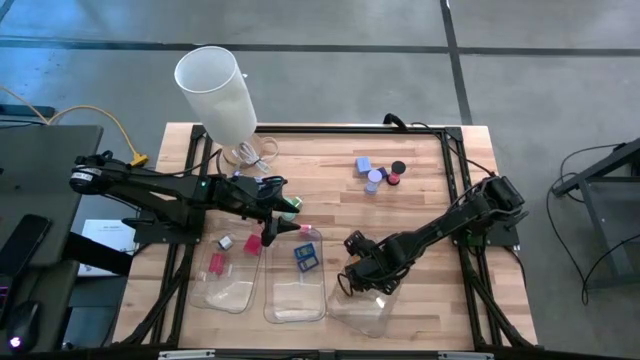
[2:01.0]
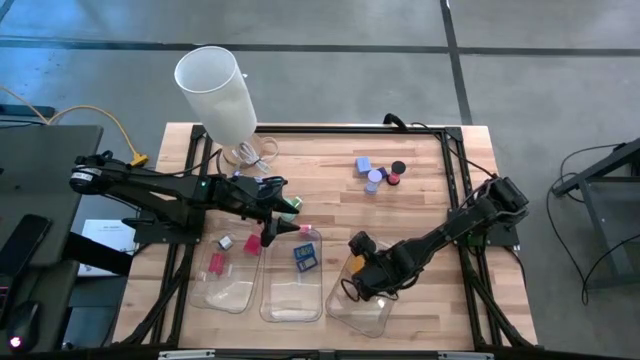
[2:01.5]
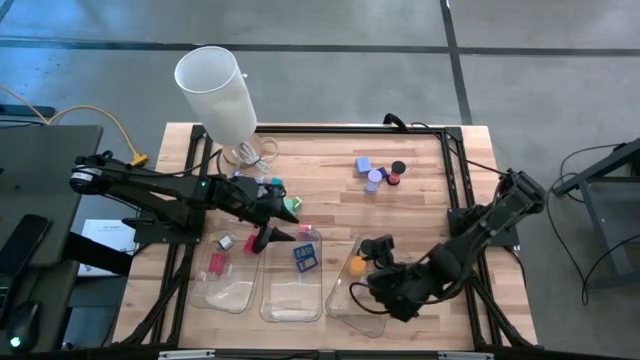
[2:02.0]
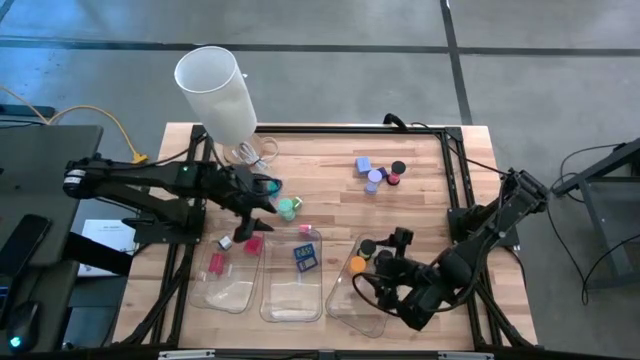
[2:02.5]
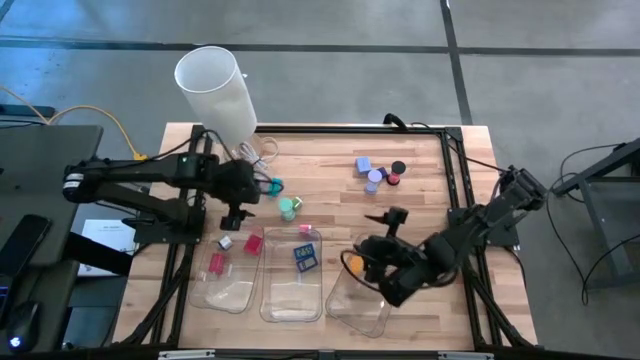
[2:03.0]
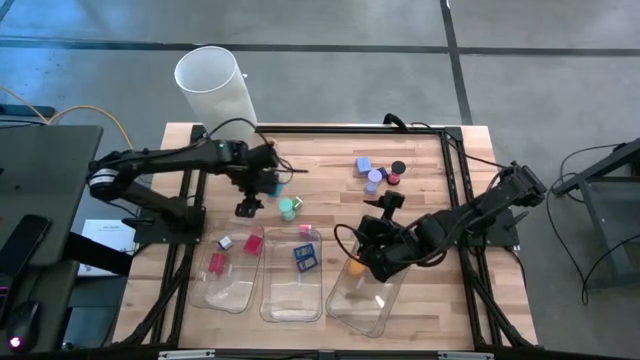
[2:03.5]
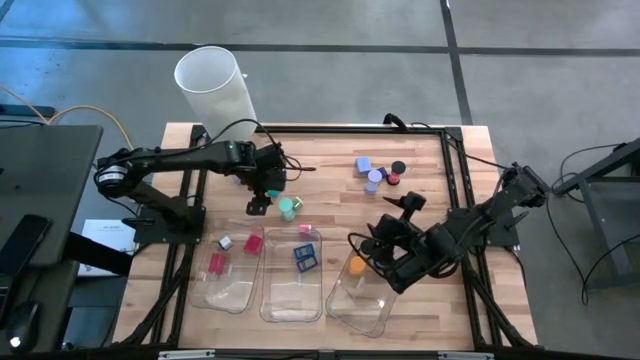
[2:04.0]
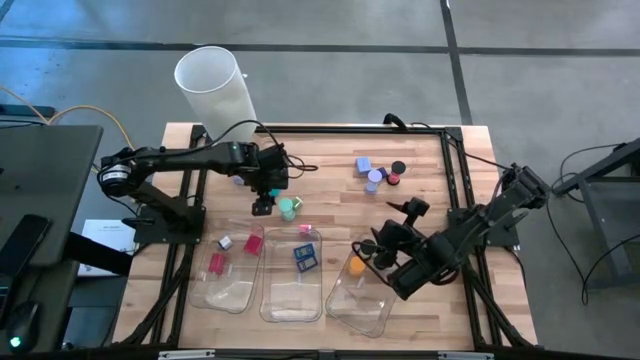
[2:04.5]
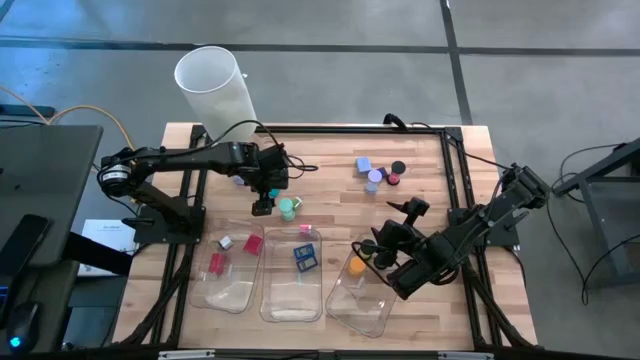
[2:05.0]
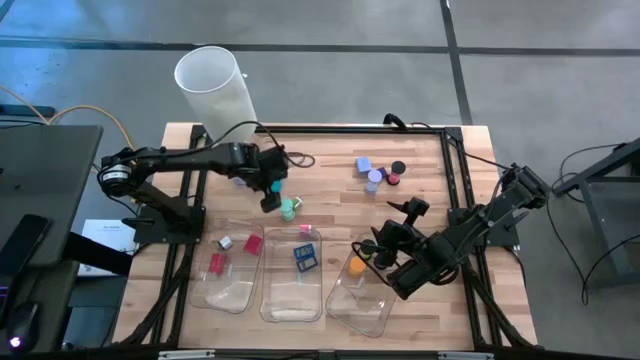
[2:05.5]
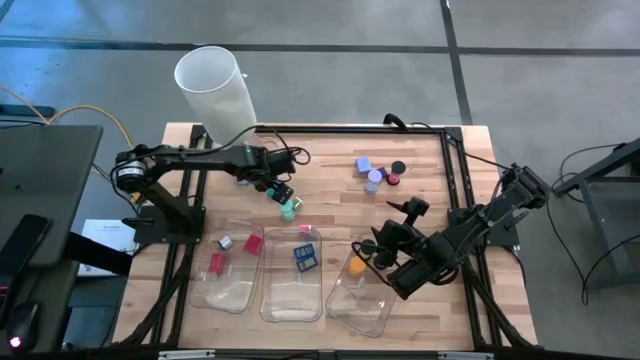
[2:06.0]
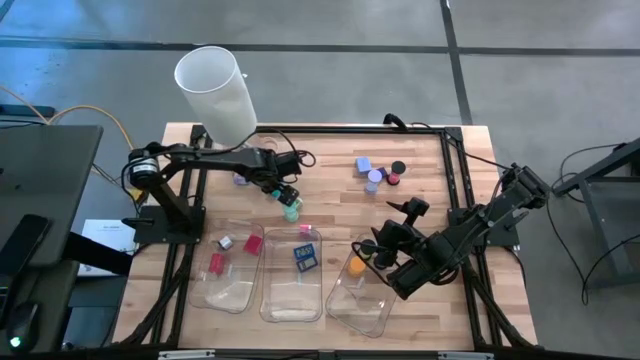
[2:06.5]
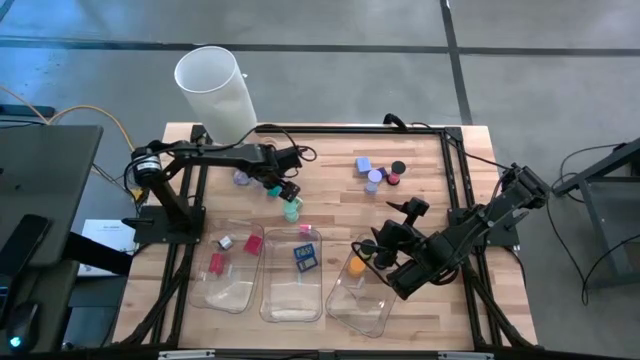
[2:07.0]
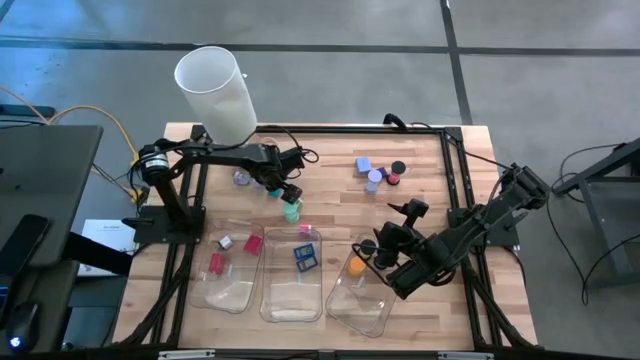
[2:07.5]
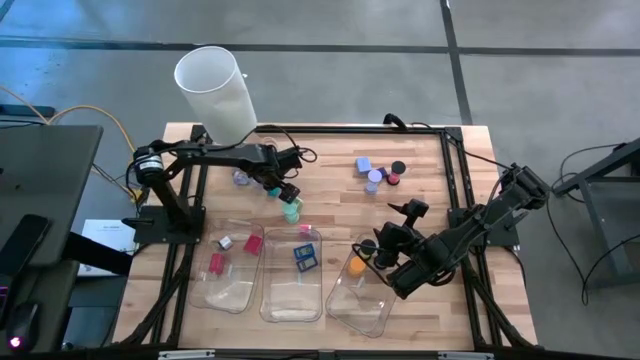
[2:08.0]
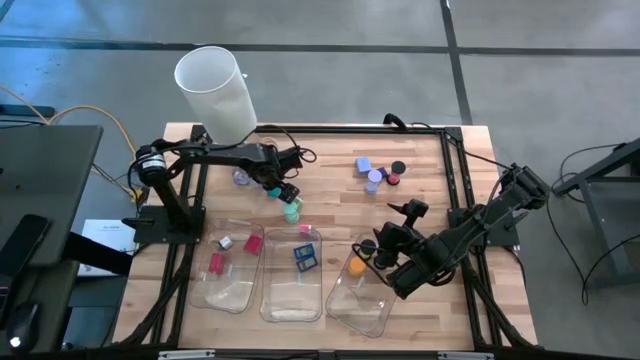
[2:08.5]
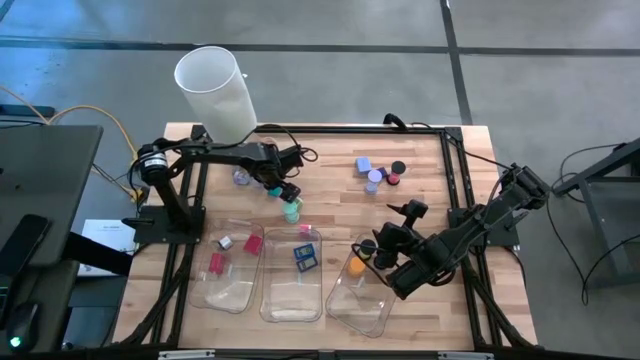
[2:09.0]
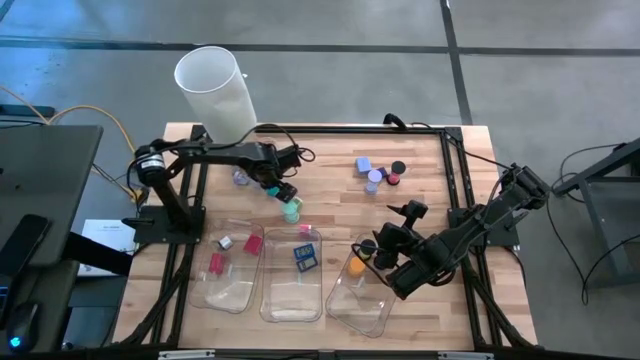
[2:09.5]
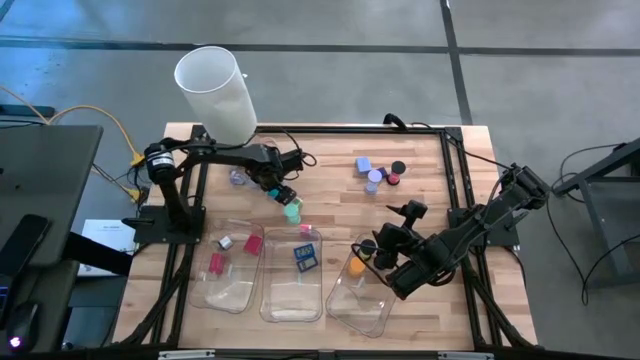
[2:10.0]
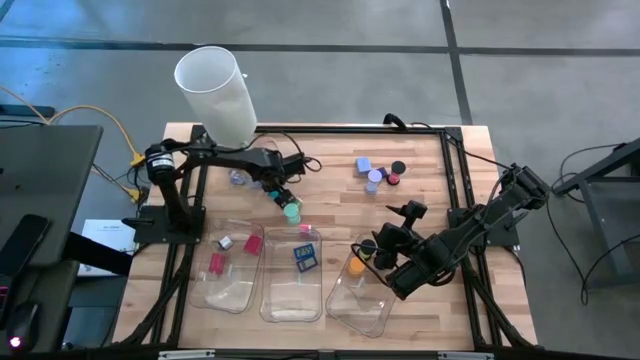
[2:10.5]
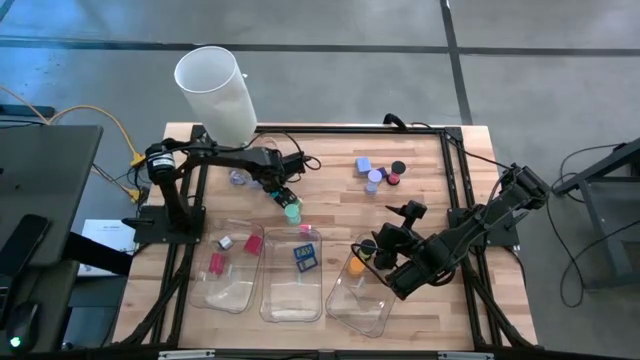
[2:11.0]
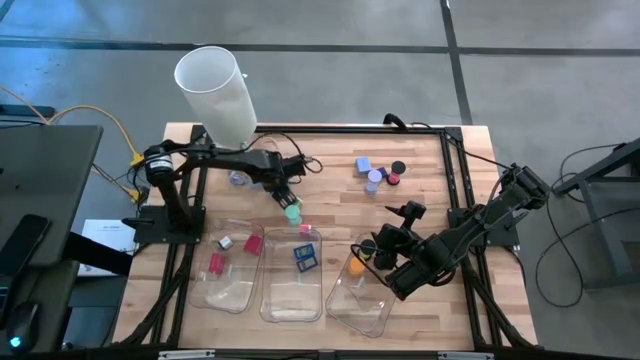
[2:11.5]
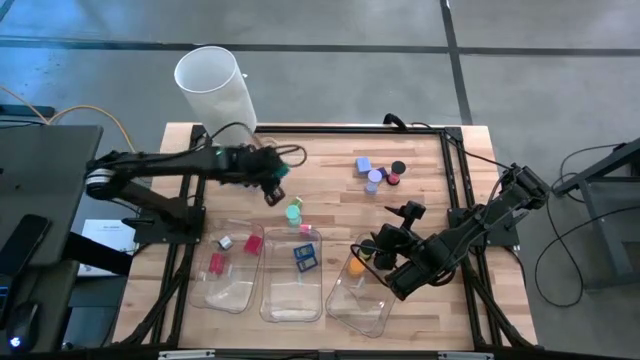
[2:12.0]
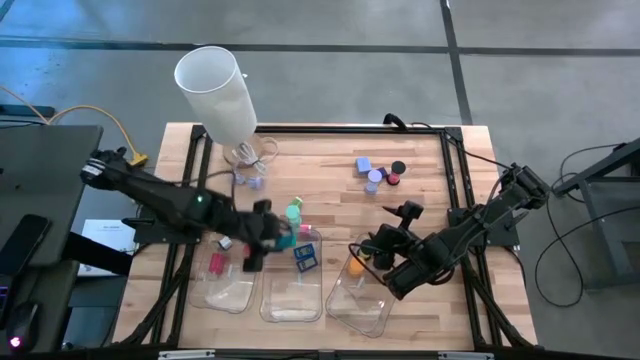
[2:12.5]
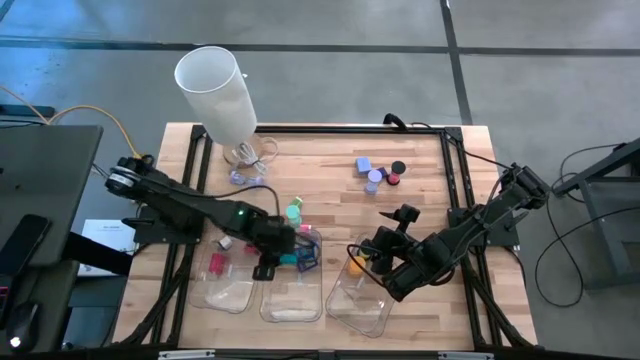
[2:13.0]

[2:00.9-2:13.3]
Task: Pick & Place Office items
Put the light blue clock into the middle bin

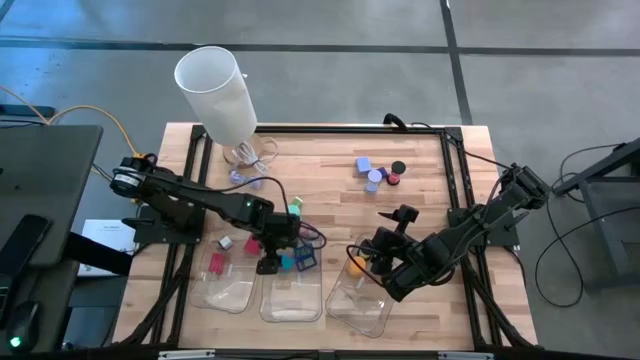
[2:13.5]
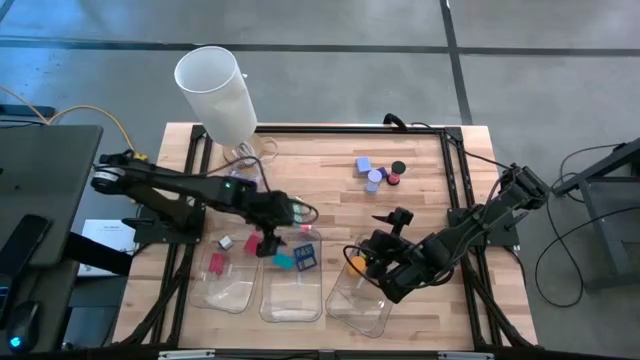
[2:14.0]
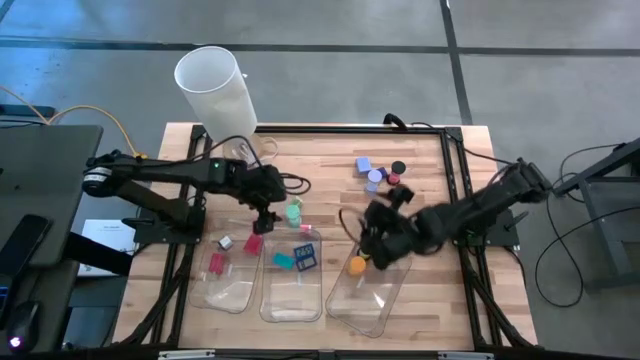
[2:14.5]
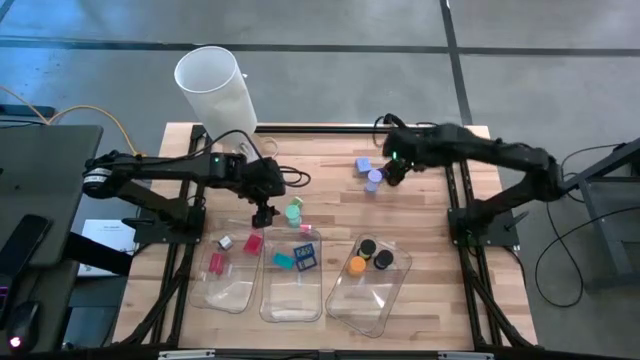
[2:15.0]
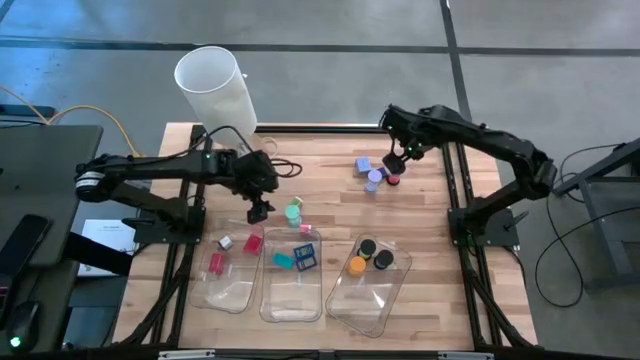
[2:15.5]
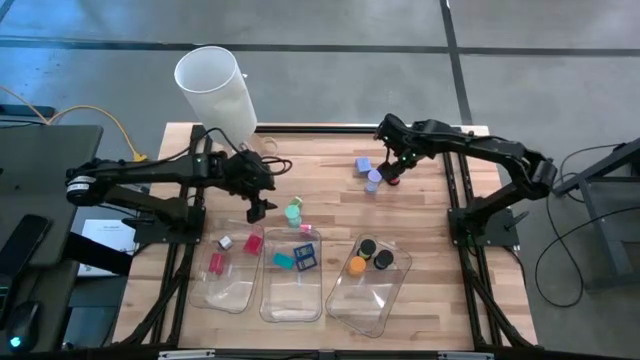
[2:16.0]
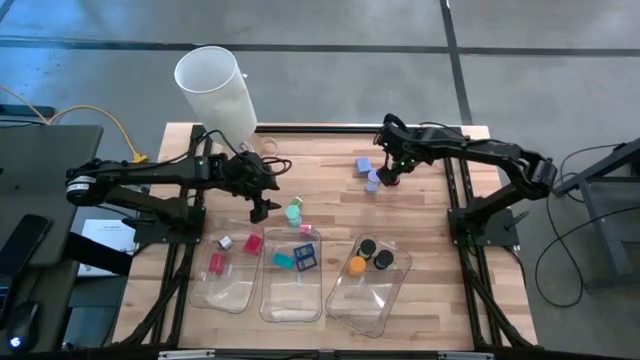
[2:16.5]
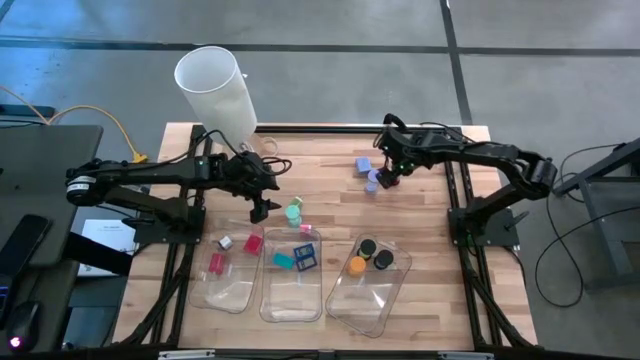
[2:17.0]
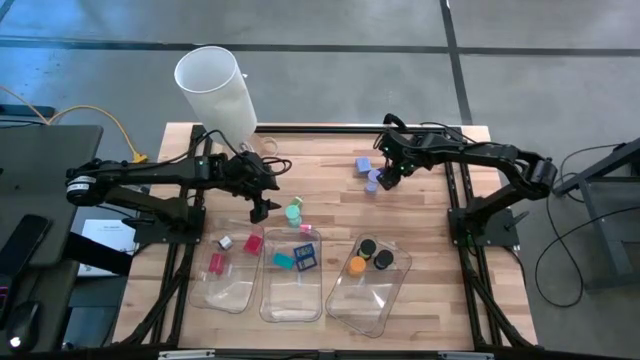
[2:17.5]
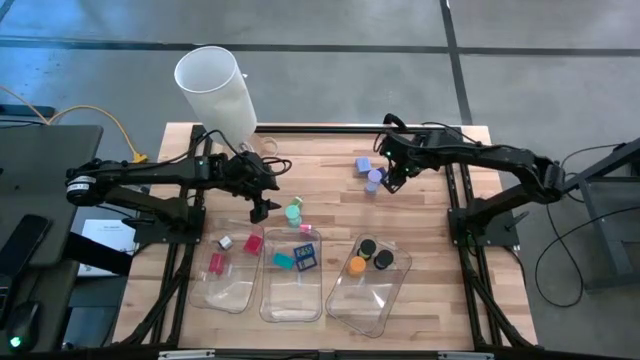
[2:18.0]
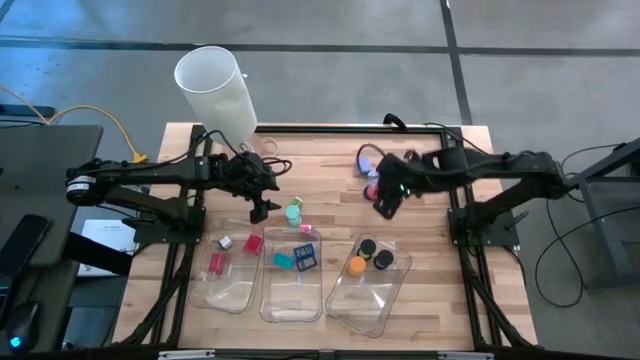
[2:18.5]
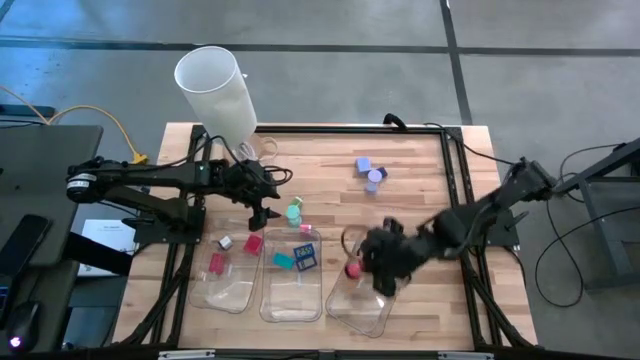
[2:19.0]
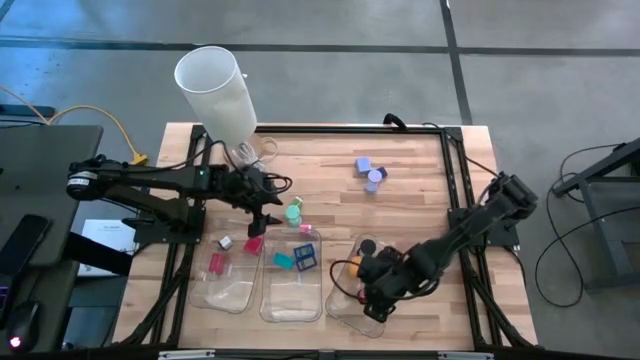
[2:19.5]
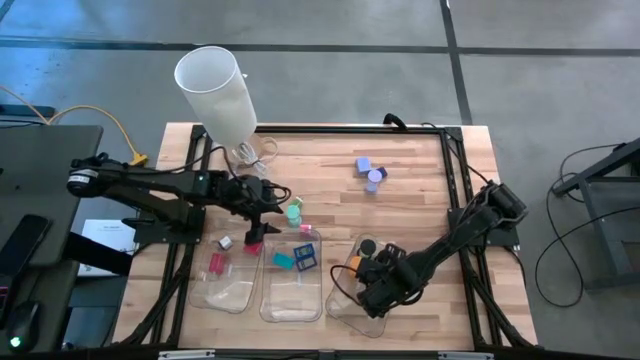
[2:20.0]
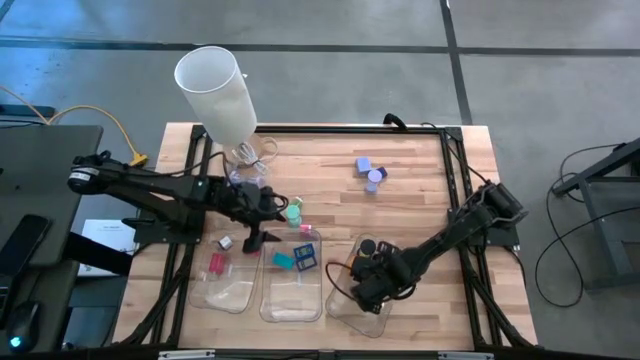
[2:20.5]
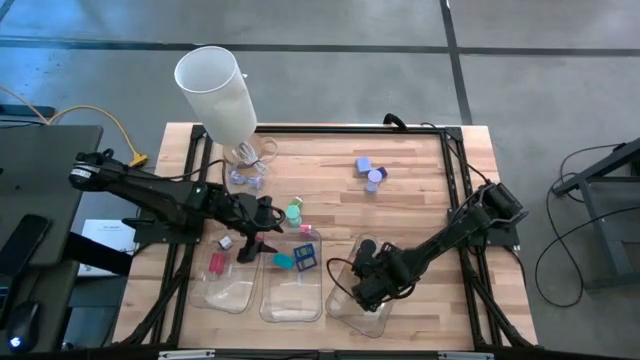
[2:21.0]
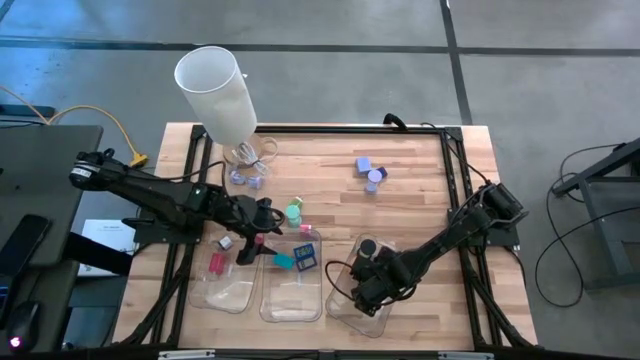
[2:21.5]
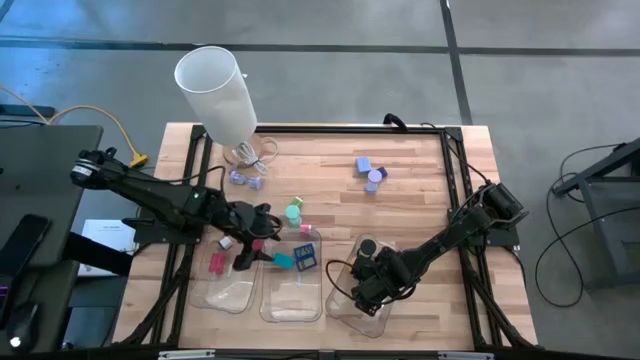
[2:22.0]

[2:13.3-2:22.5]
Put the red hourglass into the right bin

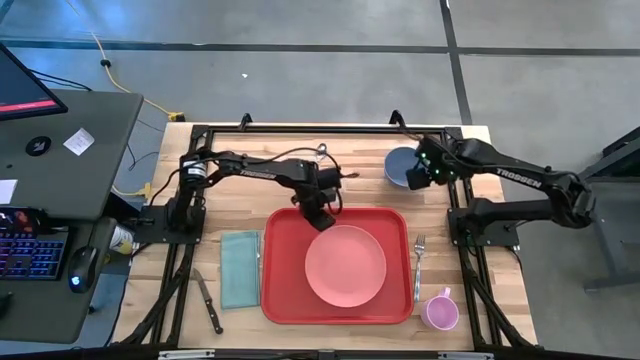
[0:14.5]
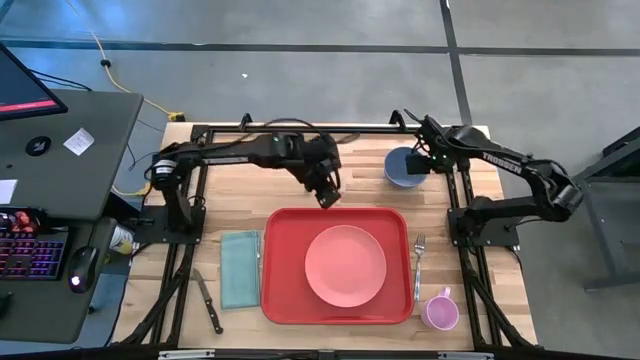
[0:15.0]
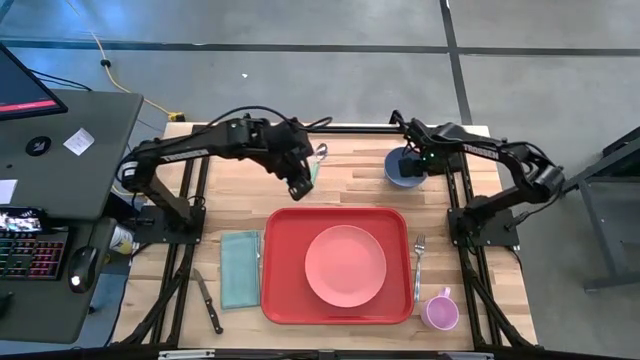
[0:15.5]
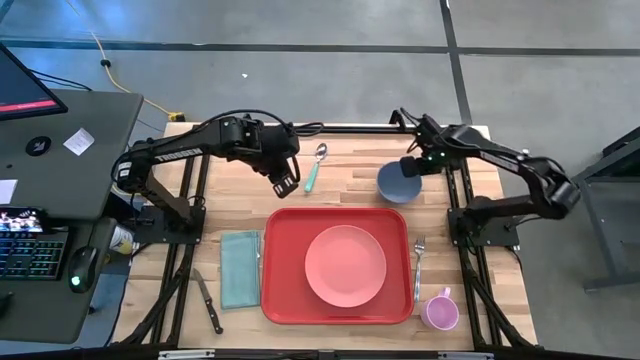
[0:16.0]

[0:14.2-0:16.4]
Task: Set up tray
Put the blue bowl on the pink plate
